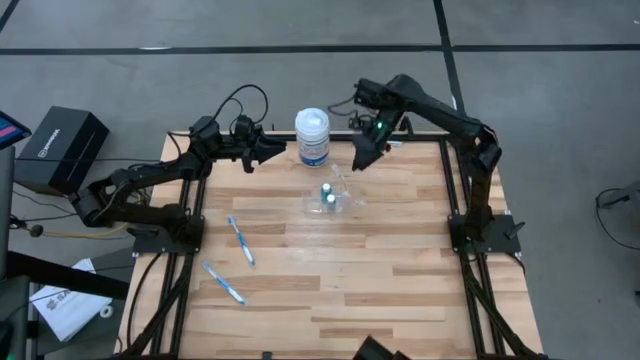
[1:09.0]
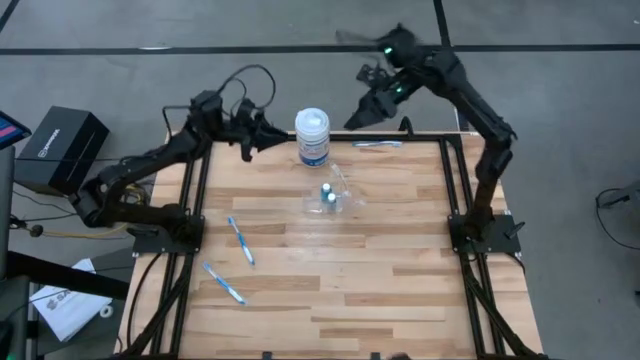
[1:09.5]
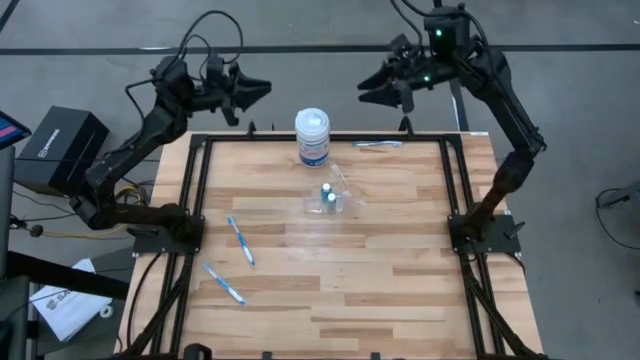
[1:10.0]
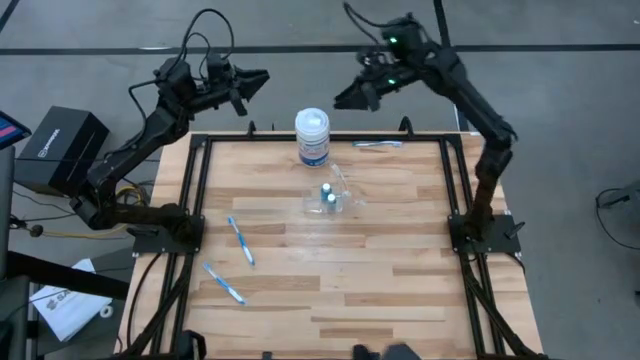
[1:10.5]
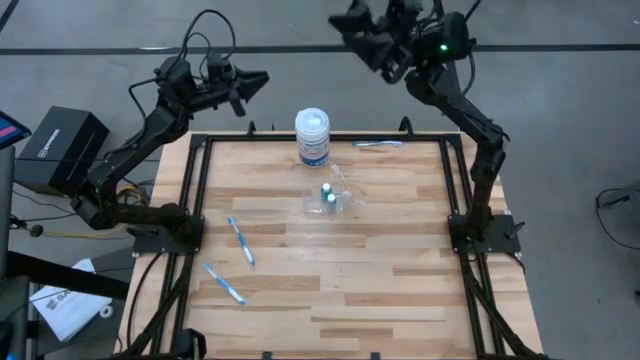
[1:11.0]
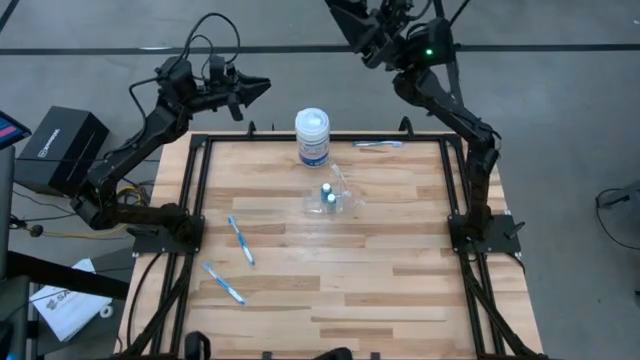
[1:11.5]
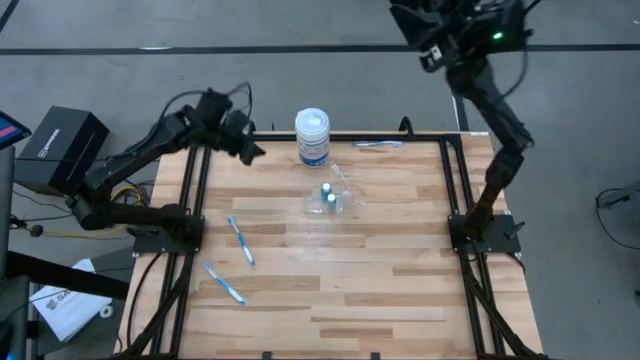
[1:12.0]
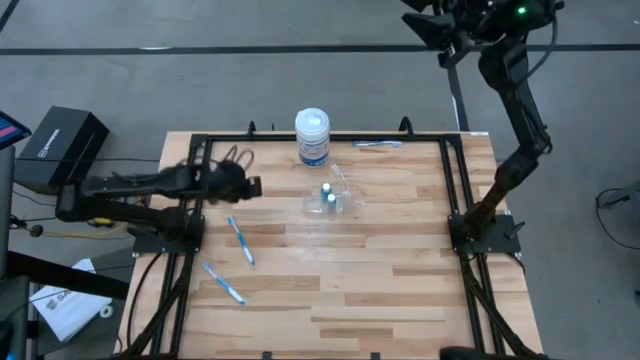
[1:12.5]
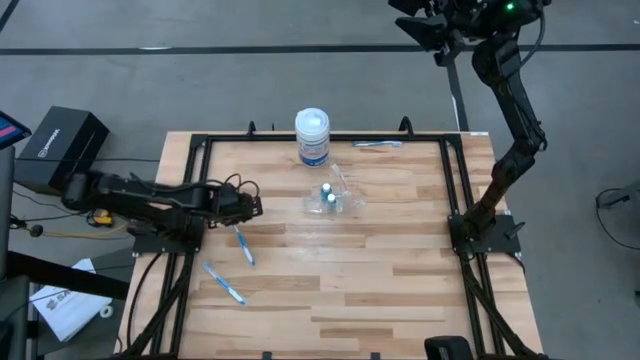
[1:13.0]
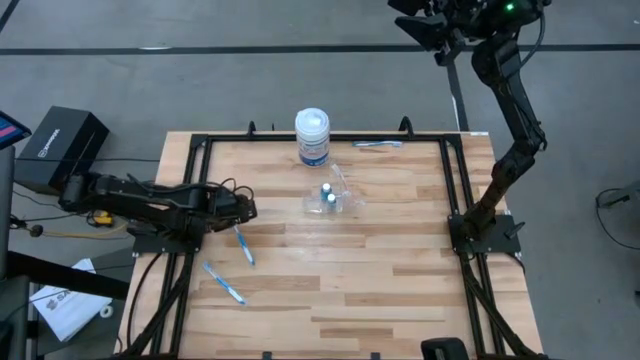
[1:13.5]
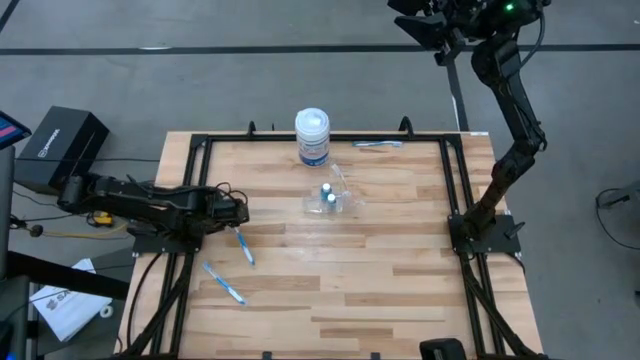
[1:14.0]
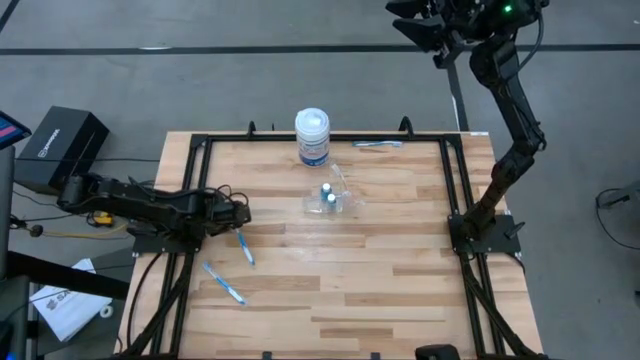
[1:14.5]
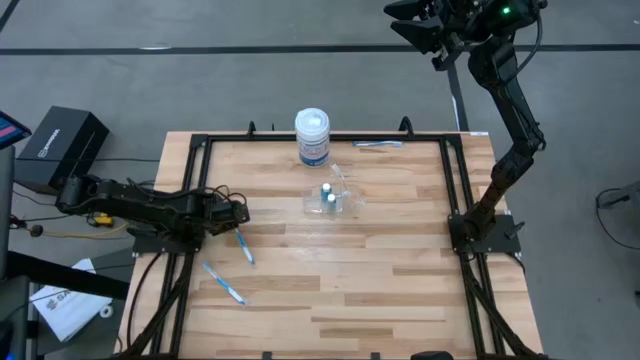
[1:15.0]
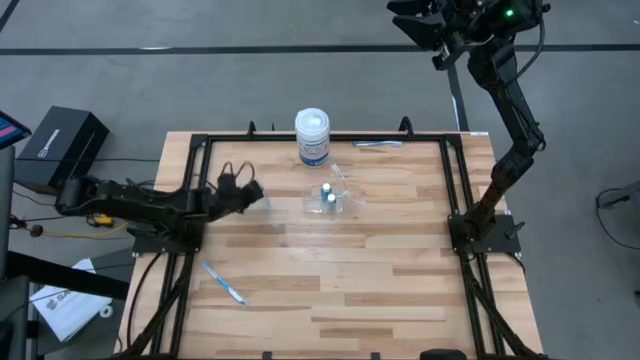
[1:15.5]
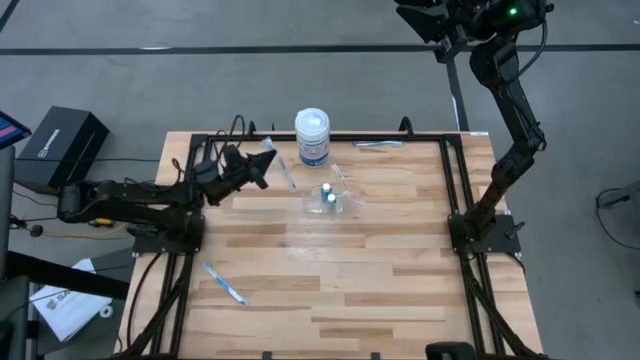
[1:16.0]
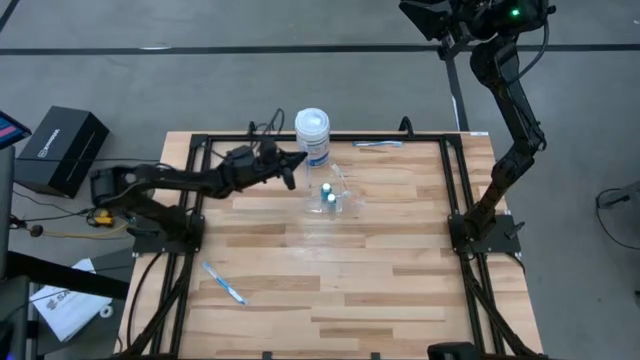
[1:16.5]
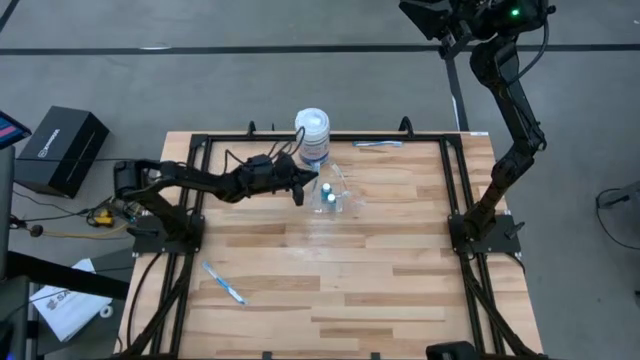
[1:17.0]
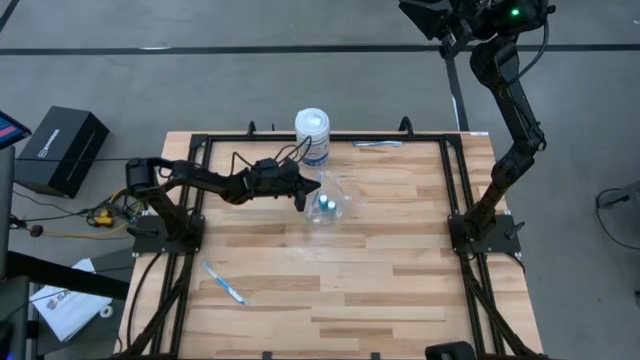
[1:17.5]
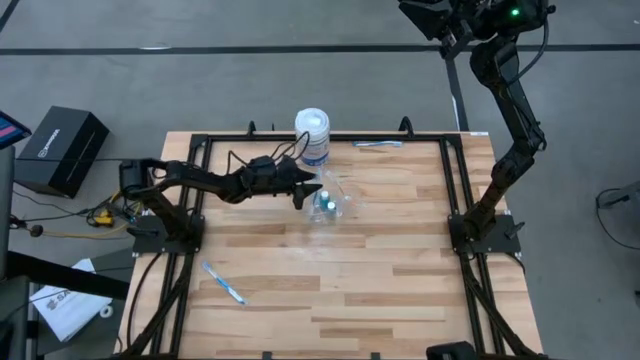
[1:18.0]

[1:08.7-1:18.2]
Task: Pick & Place toothbrushing station
Put the middle blue toothbrush into the transparent organizer

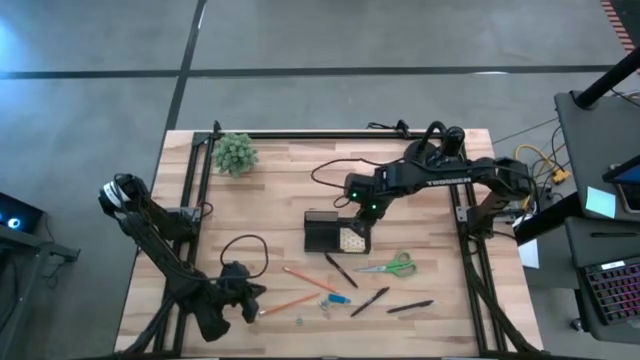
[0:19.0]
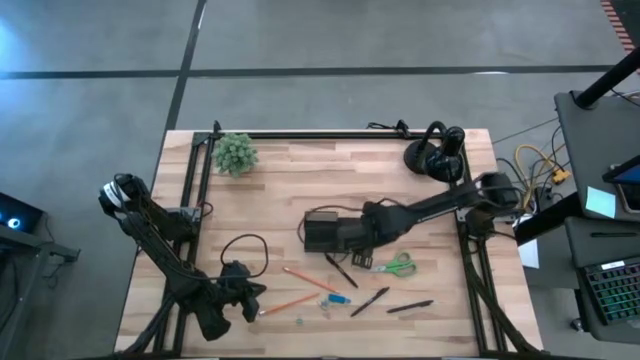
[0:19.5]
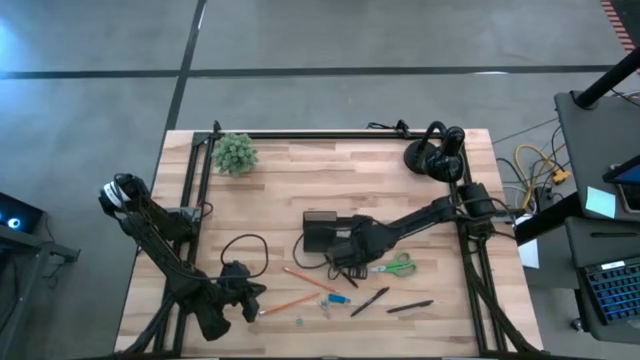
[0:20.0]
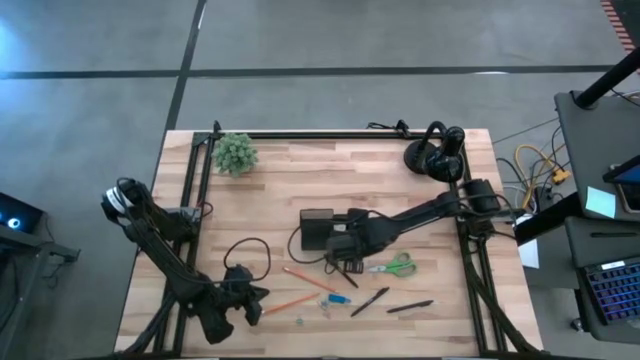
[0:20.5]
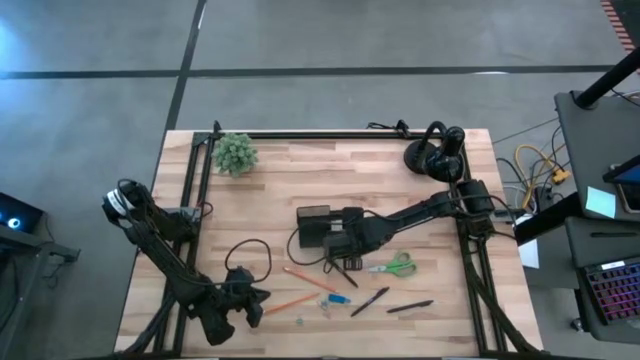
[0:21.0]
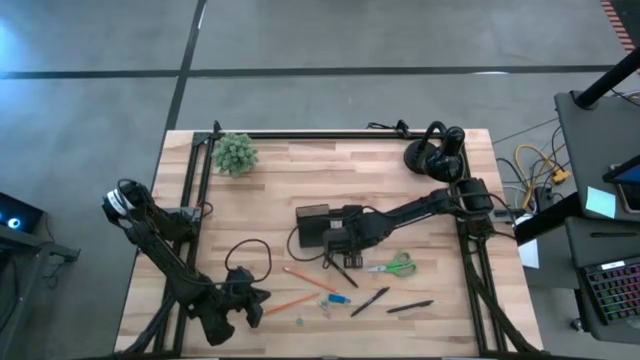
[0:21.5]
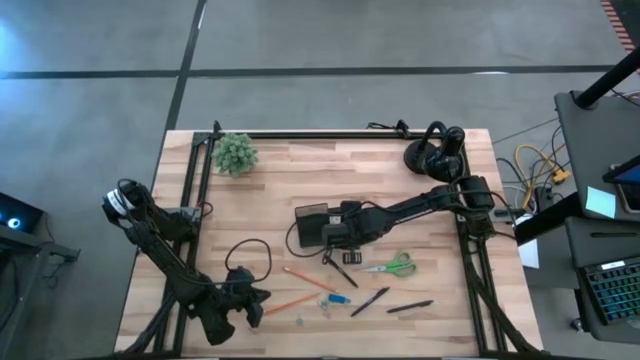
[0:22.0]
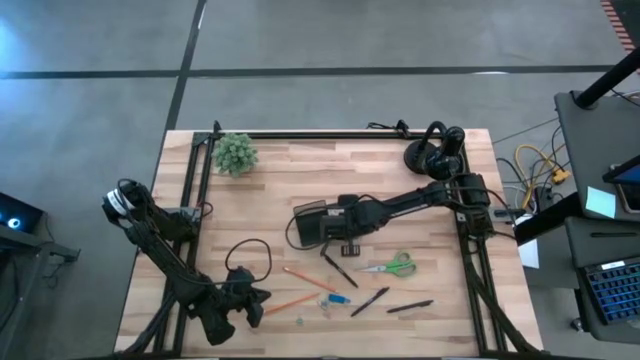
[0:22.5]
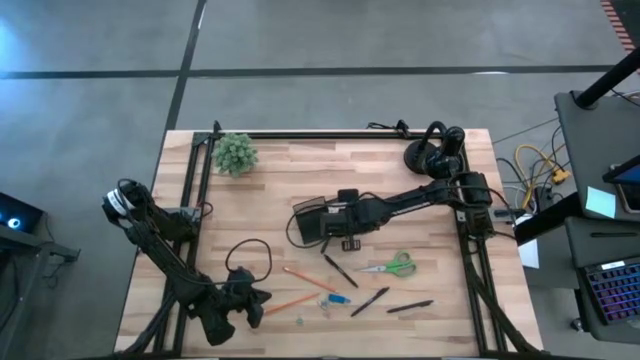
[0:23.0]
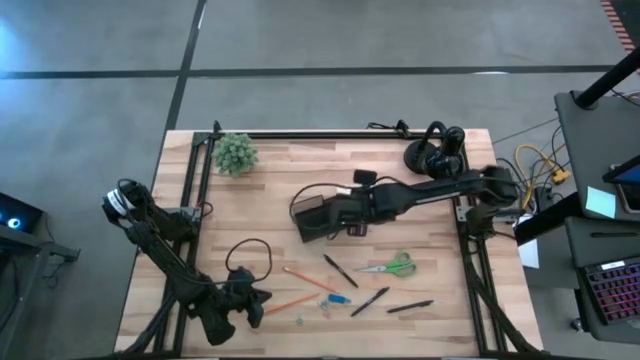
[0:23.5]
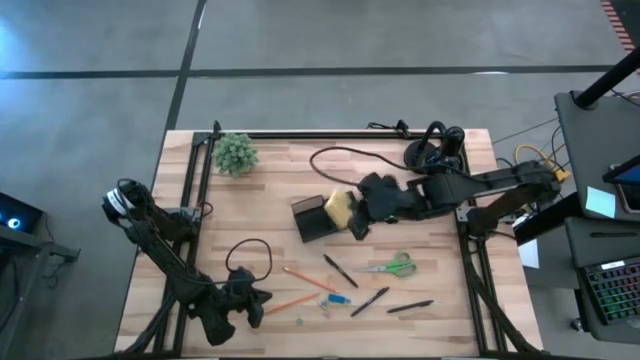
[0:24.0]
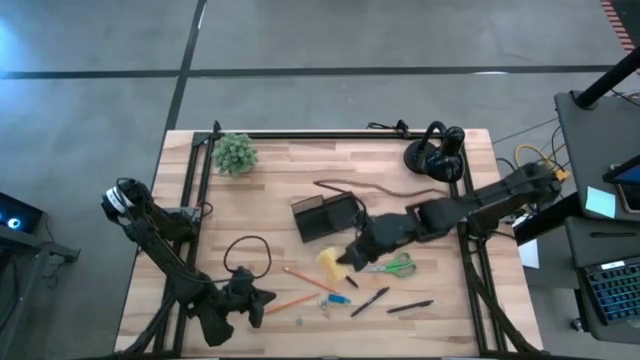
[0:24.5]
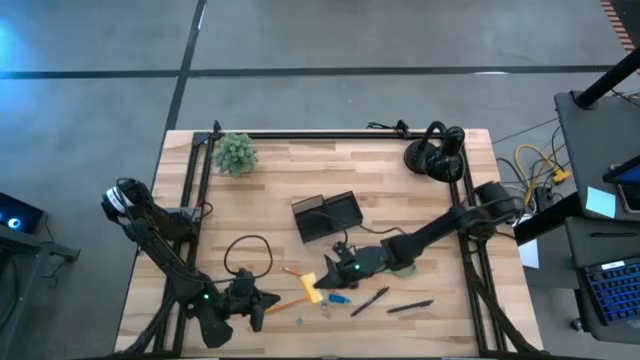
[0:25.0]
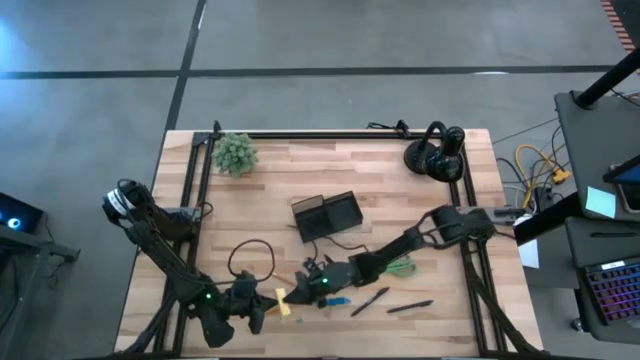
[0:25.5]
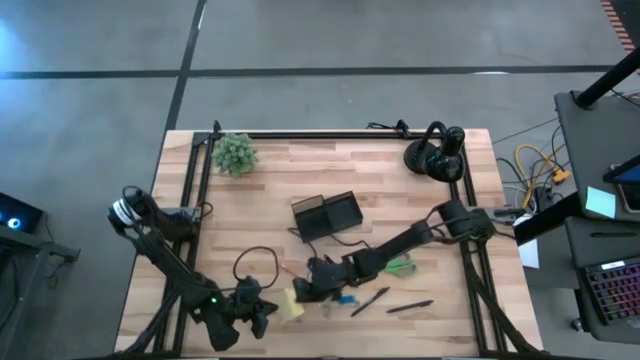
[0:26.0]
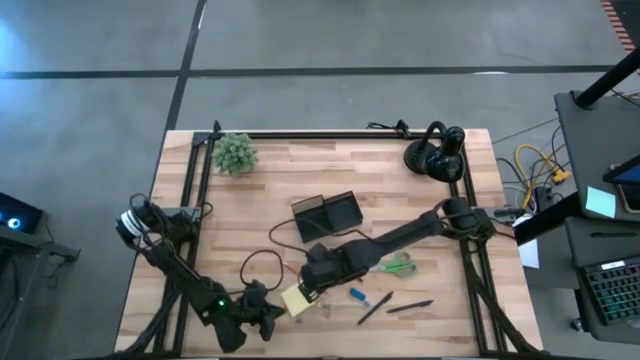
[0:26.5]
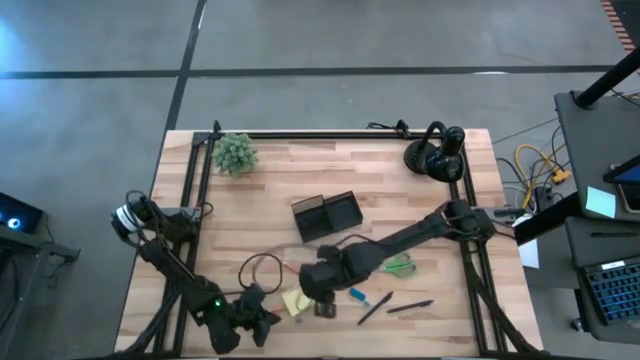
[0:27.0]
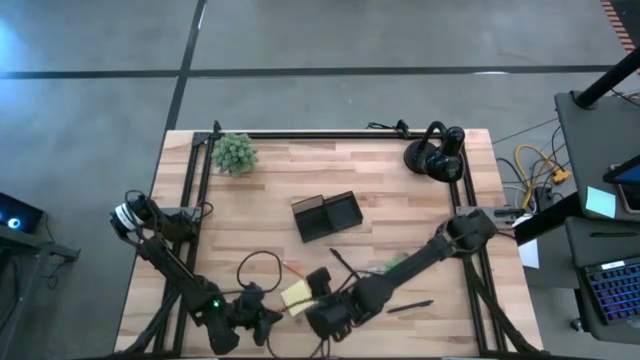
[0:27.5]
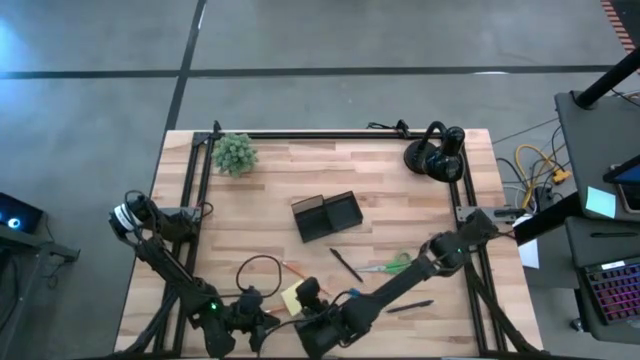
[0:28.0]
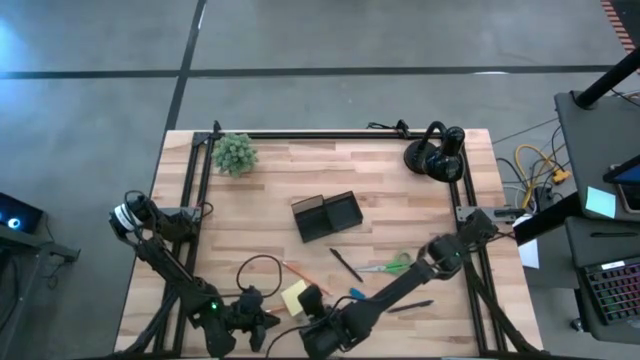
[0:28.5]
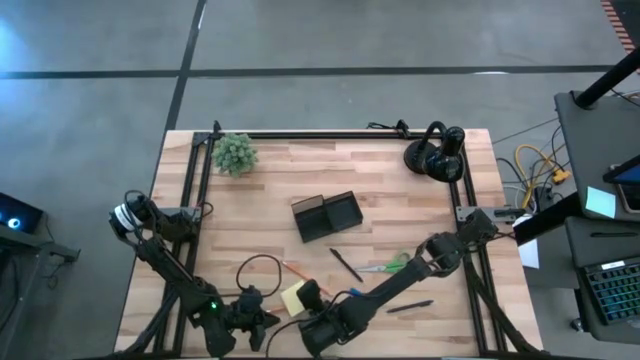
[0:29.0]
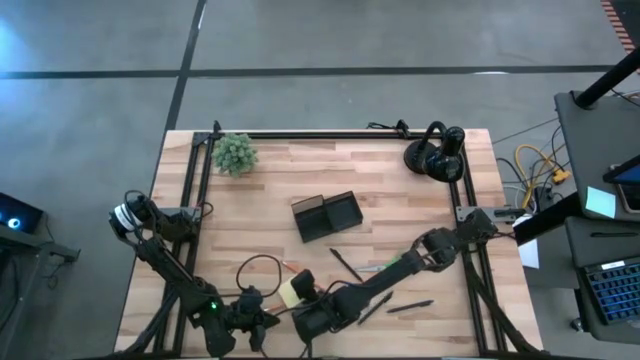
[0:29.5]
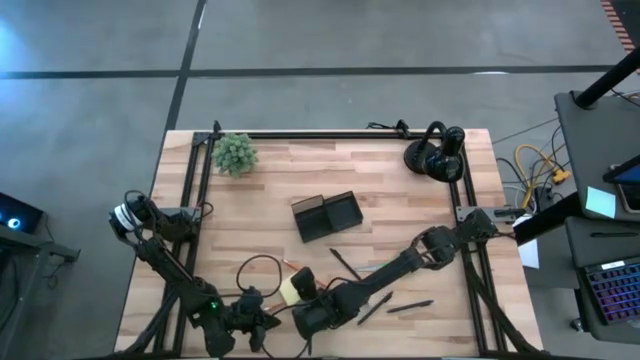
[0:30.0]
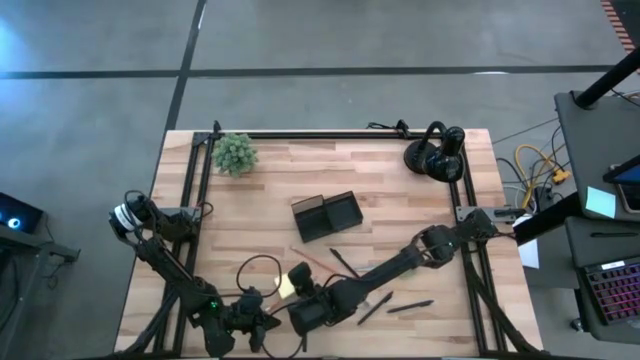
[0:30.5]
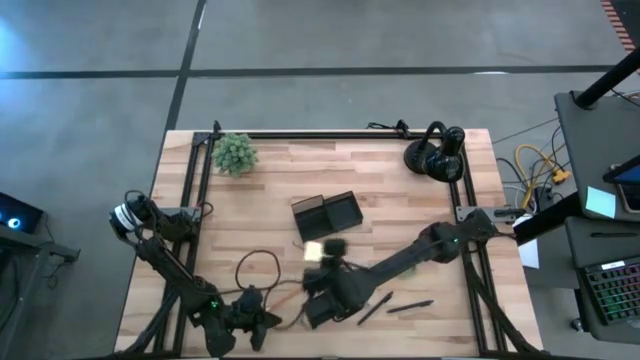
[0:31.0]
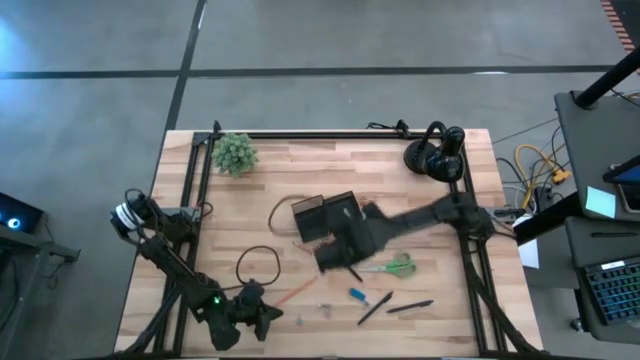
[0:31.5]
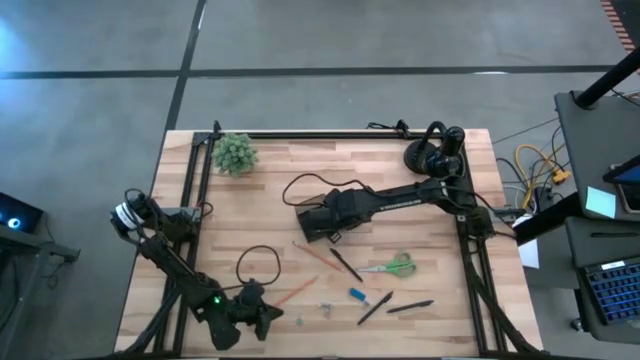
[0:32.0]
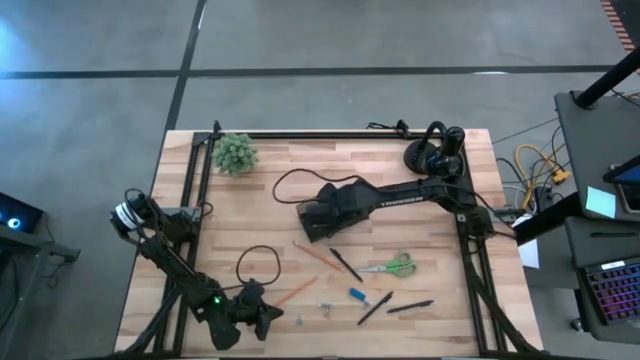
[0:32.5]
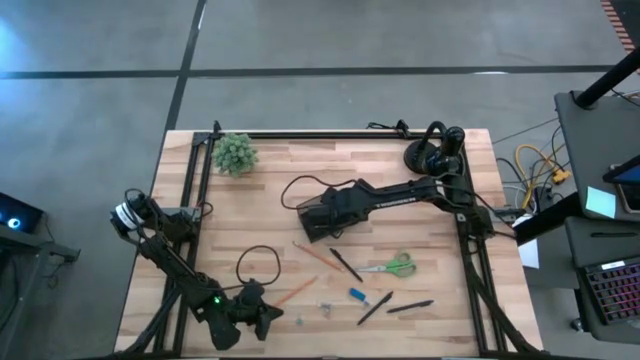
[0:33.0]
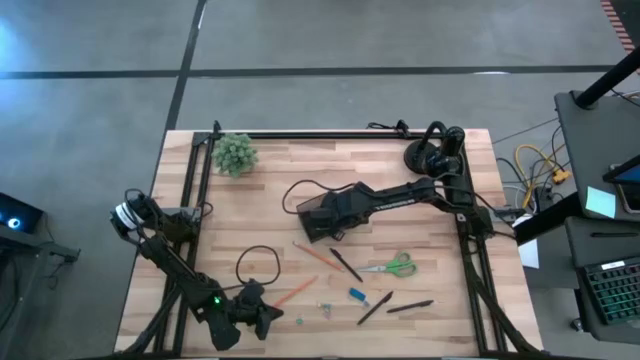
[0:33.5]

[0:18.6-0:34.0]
Task: Pick and place office supplies into organizer
Put the yellow sticky note into the black desk organizer
